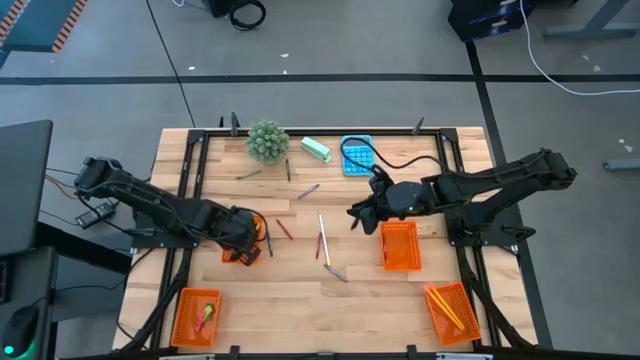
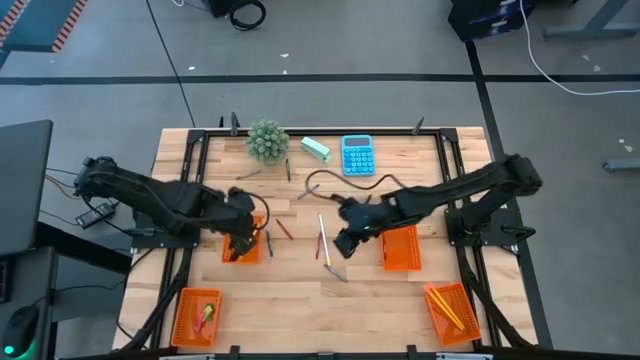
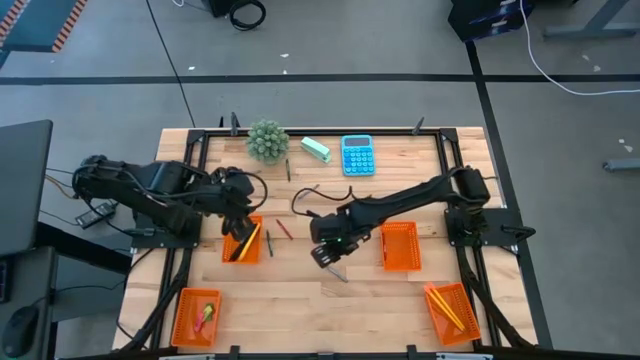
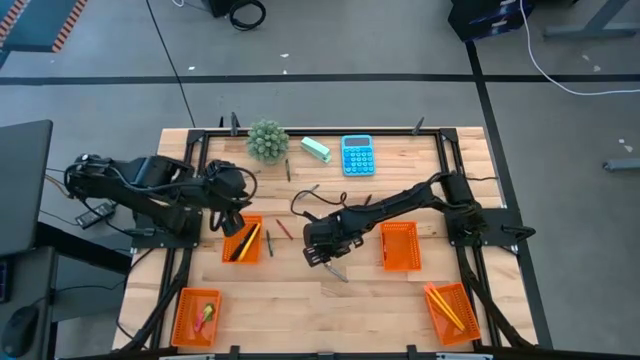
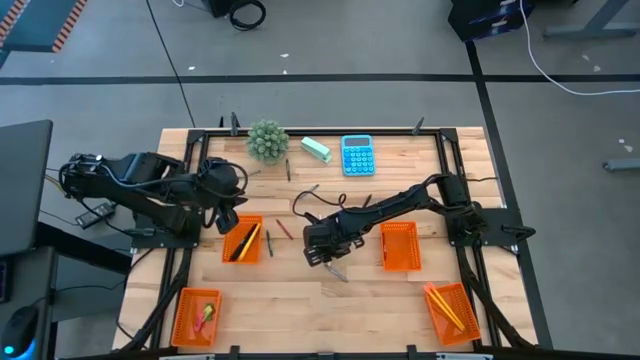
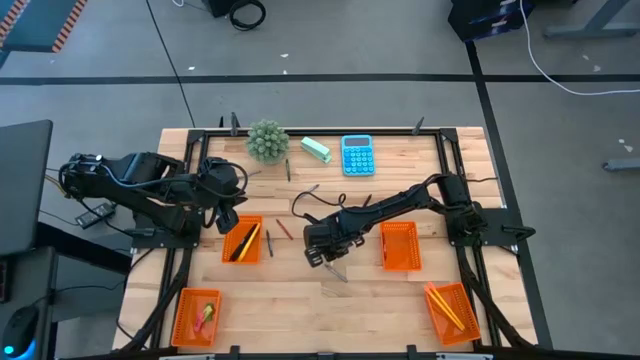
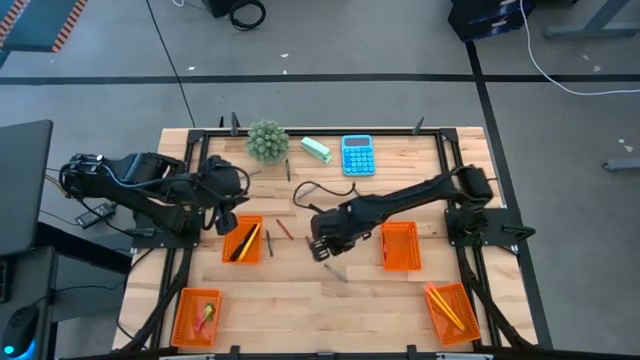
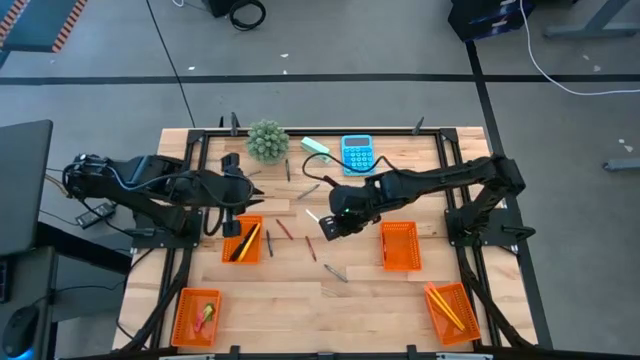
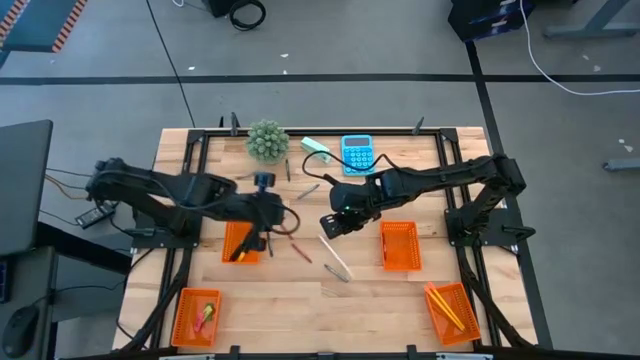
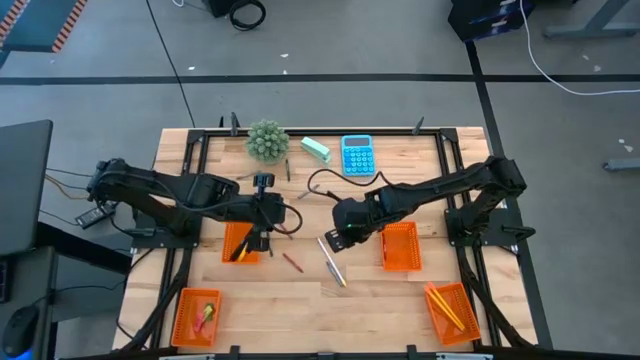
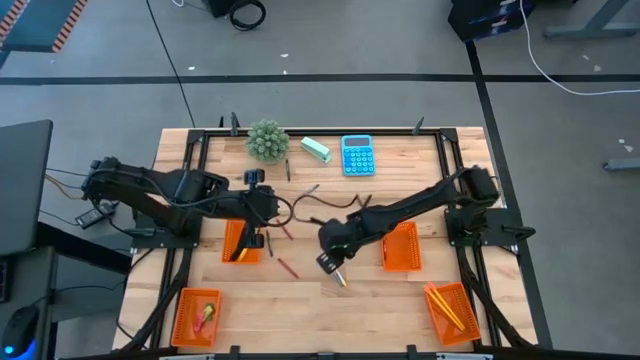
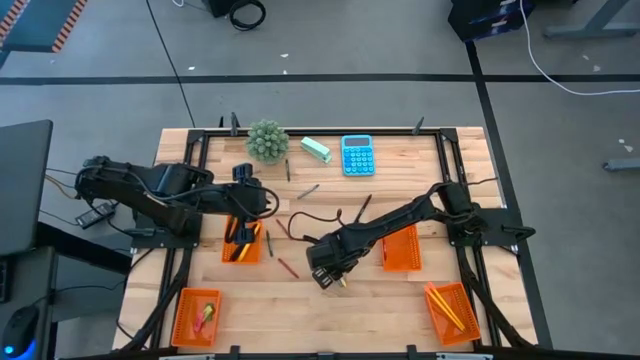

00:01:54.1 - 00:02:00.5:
Task: Sort crayons/erasers/pens/pencils in bins
Put the white pencil into the bottom right orange basket

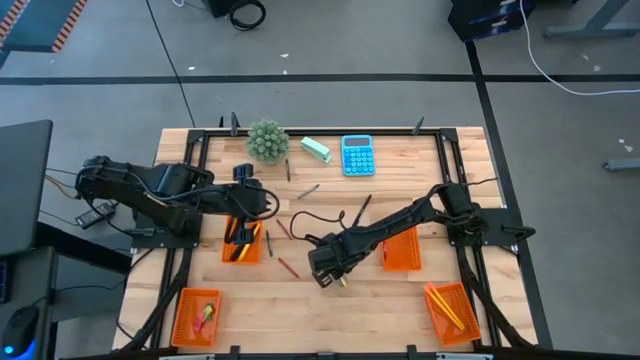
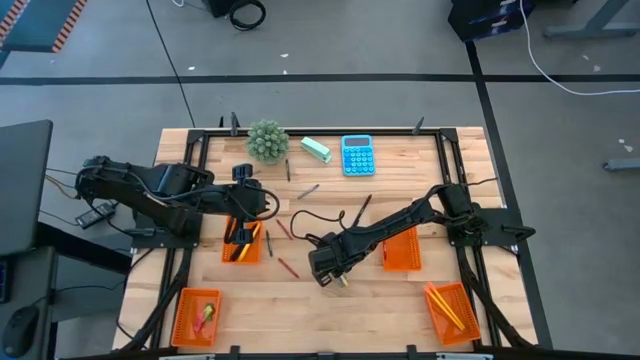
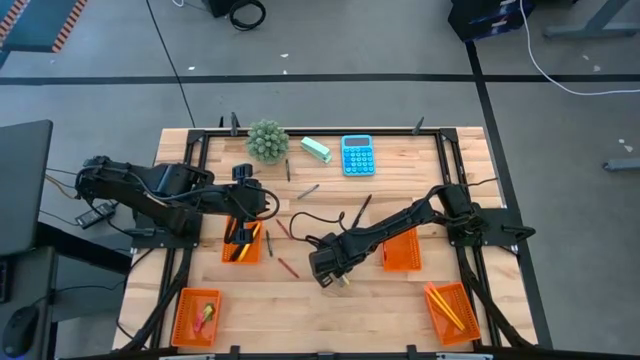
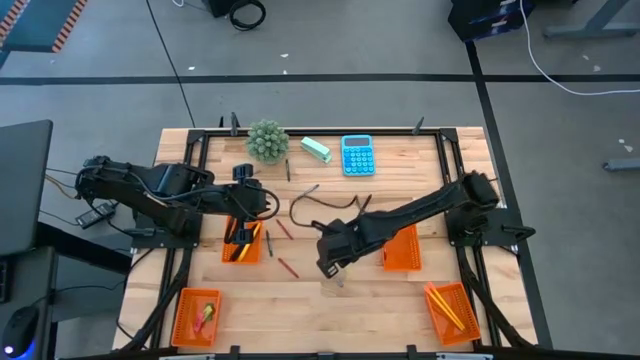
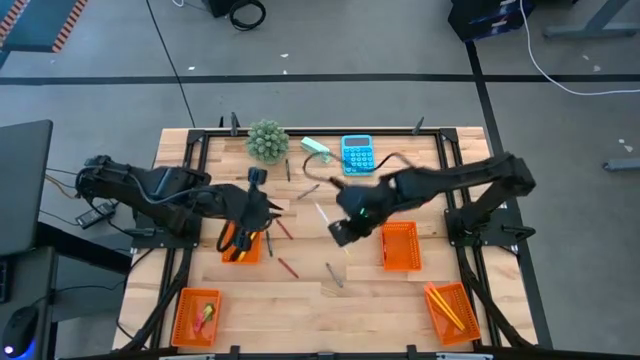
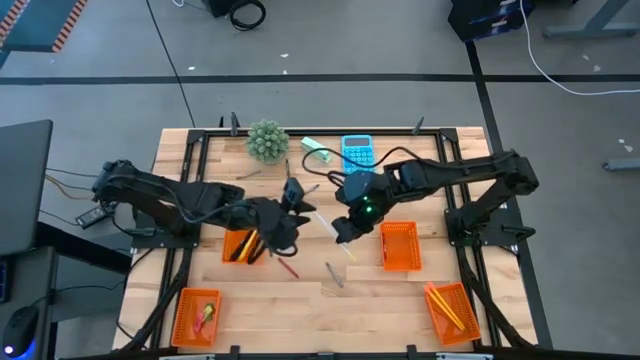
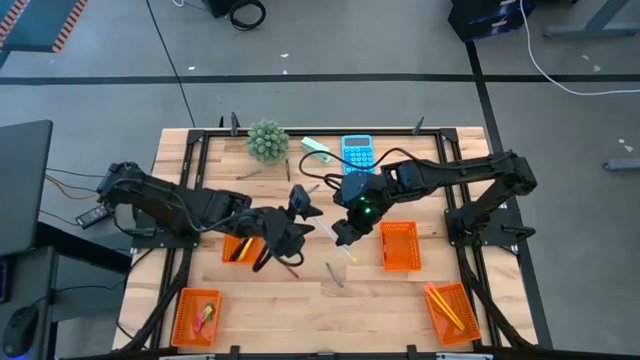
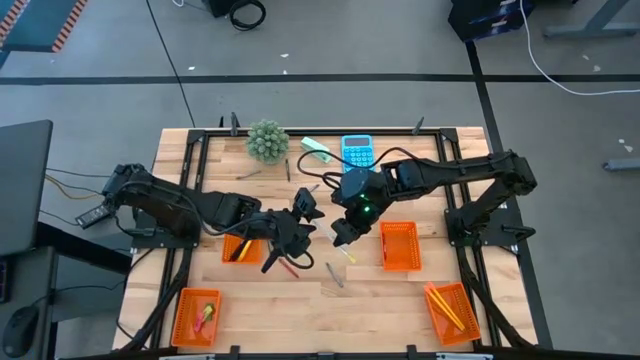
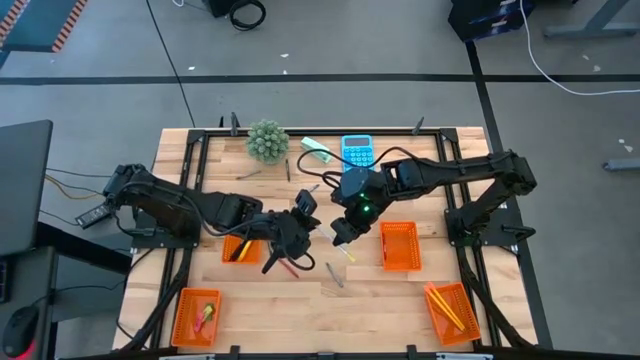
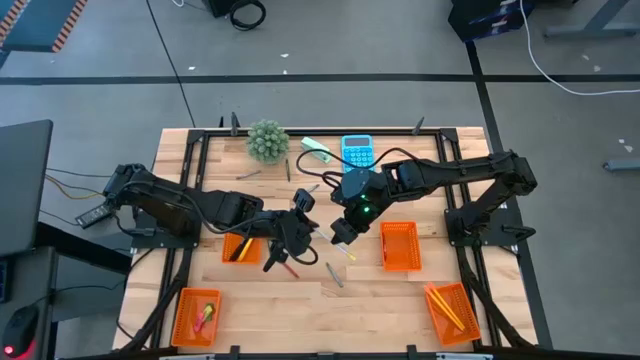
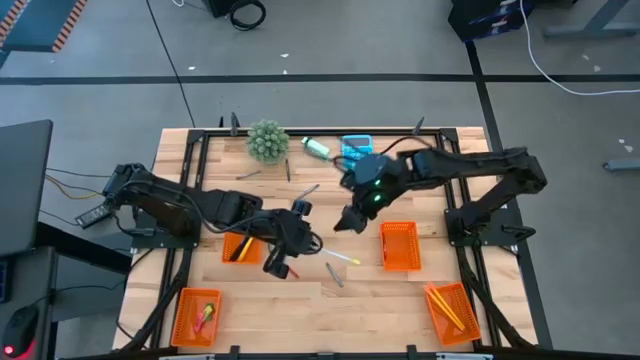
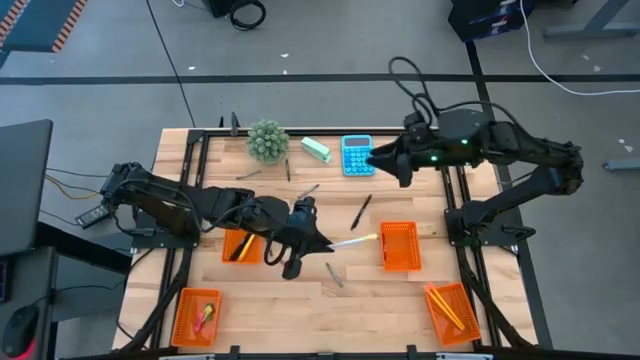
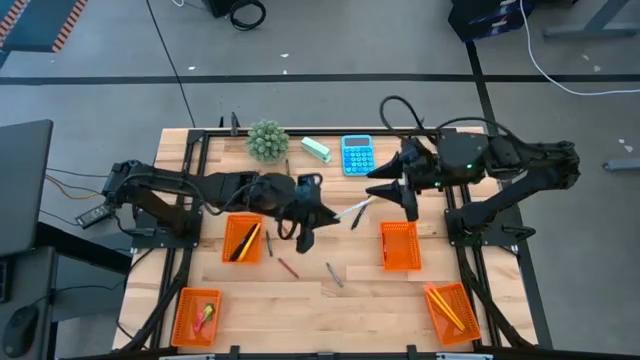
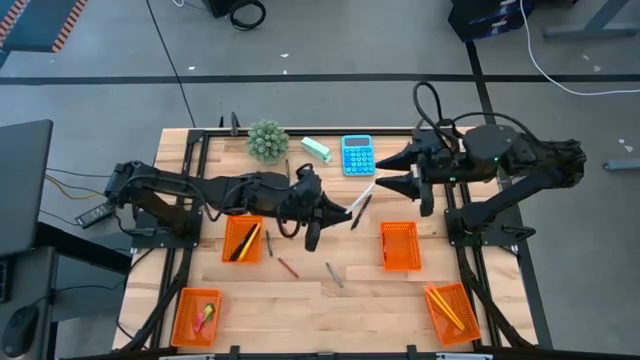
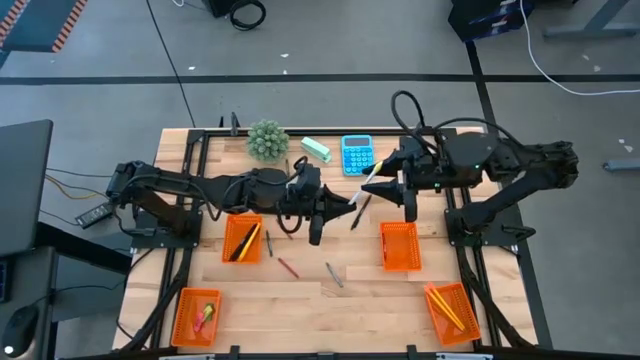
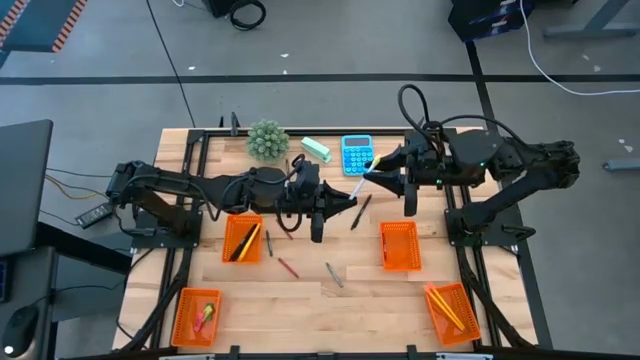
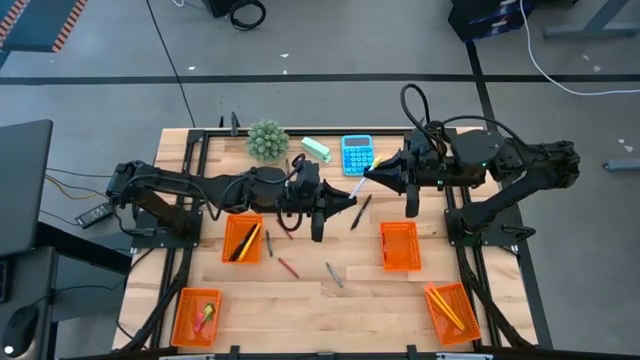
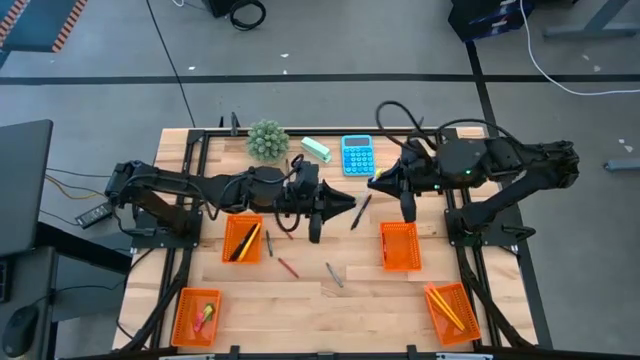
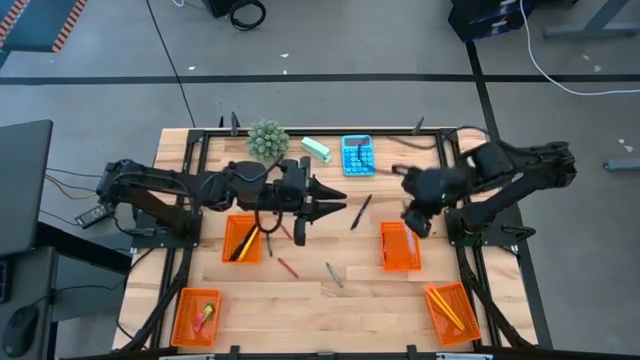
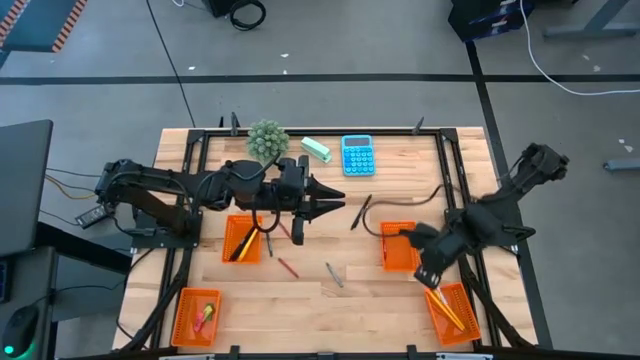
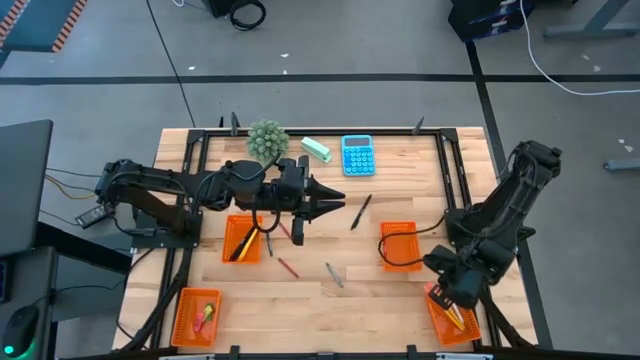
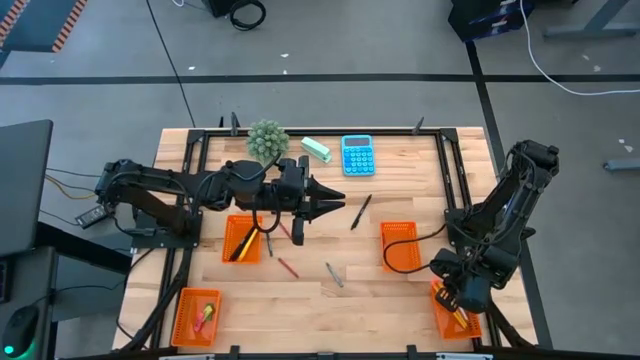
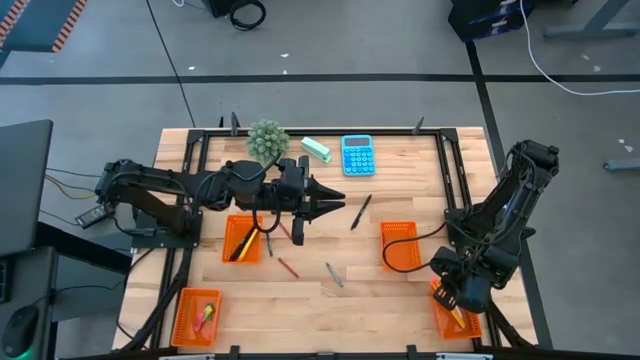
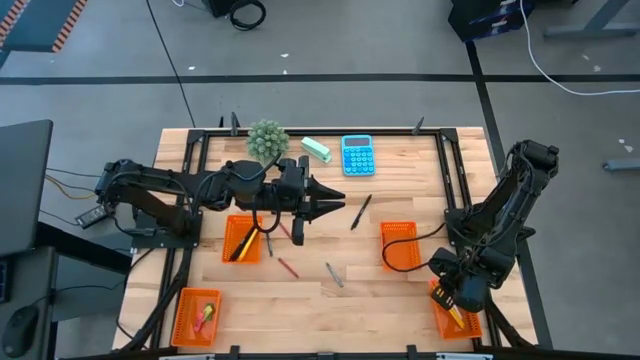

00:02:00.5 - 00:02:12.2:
Put the white pencil into the bottom right orange basket

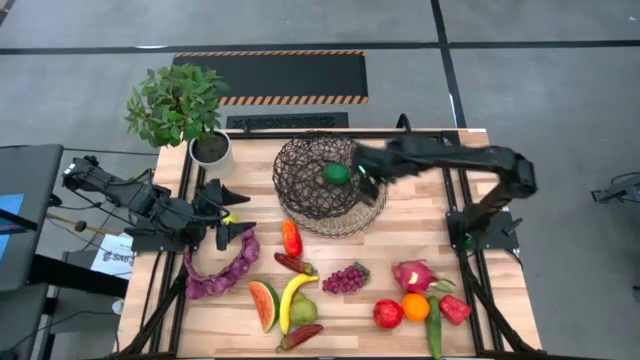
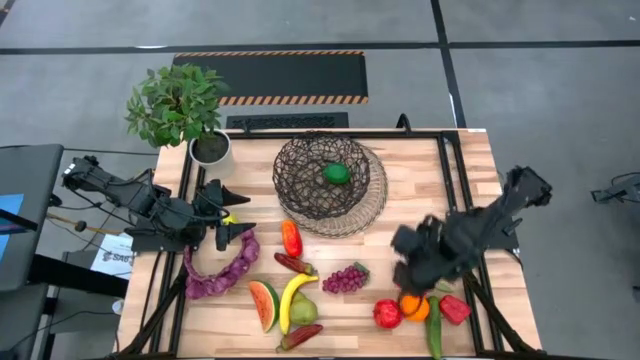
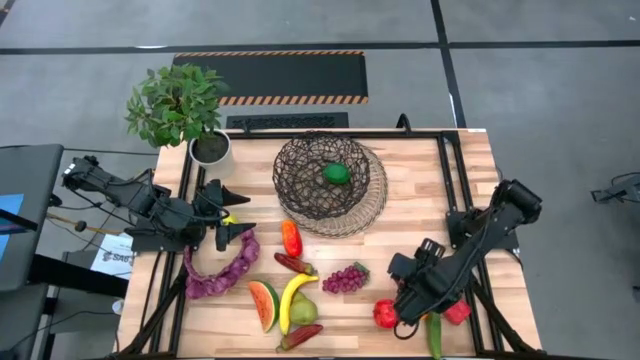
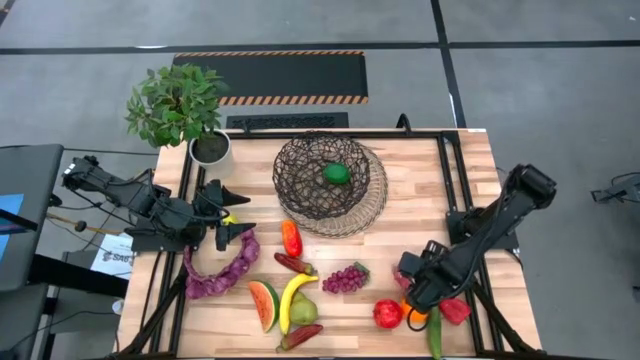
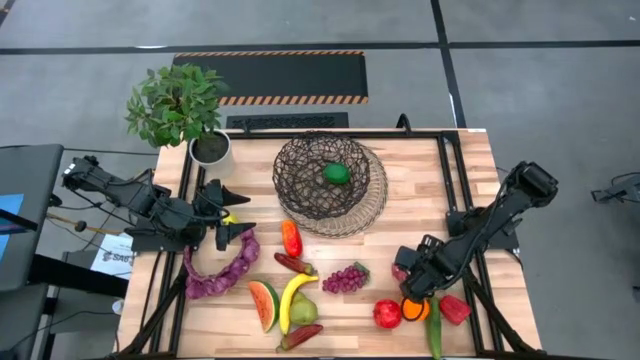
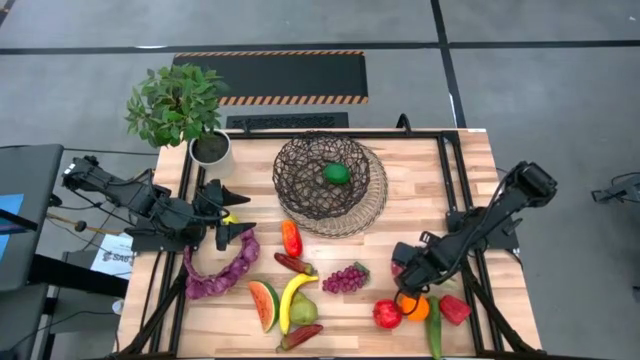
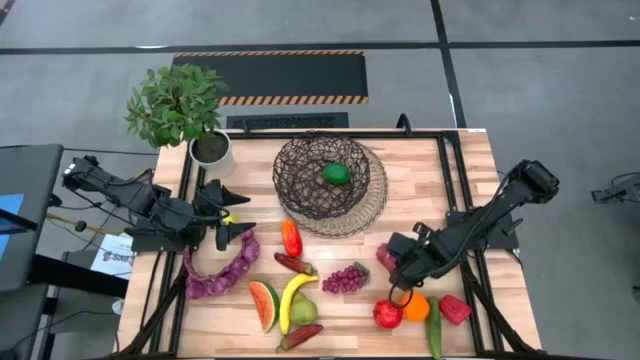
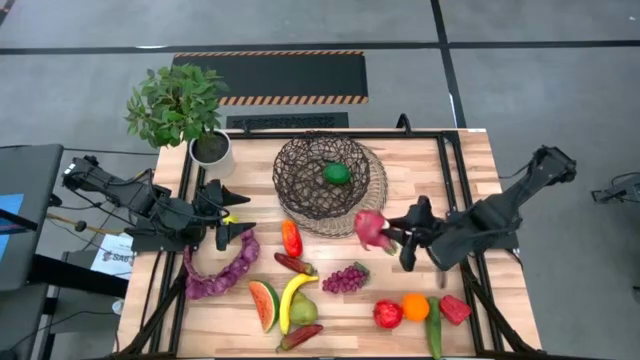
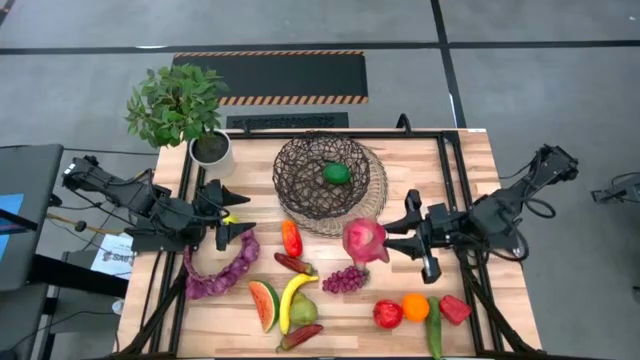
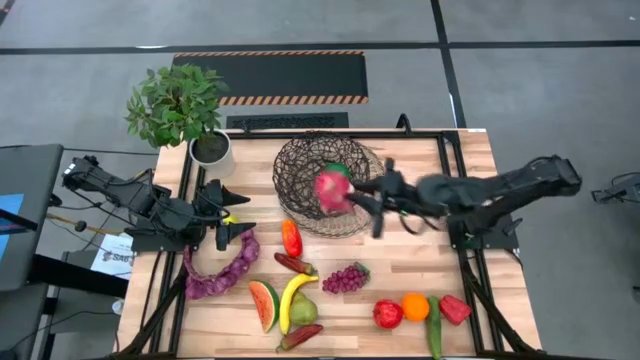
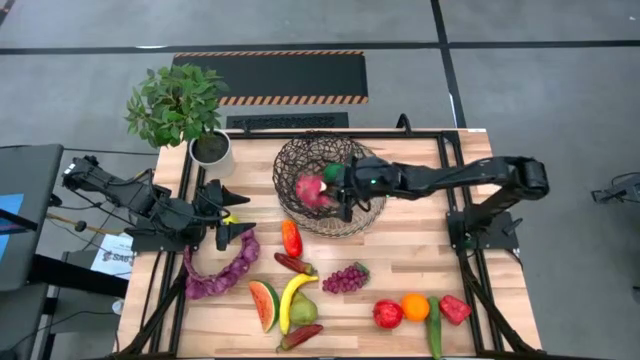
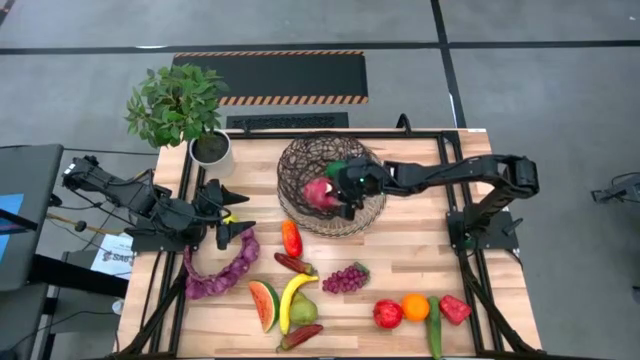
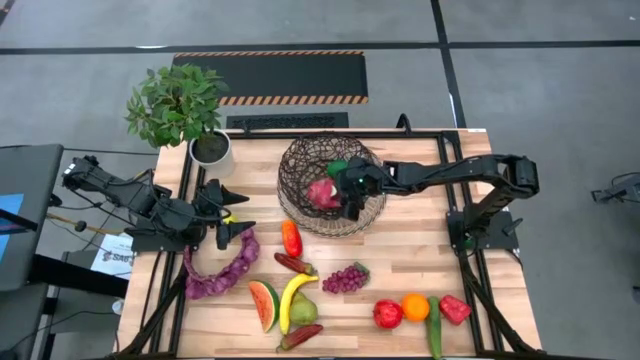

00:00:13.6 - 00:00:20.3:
Task: Build produce basket
Put the dragonfruit into the basket
